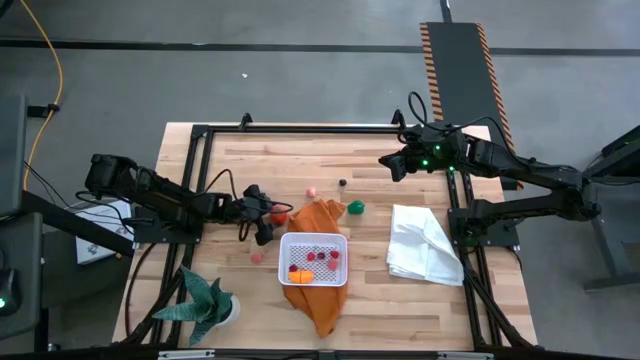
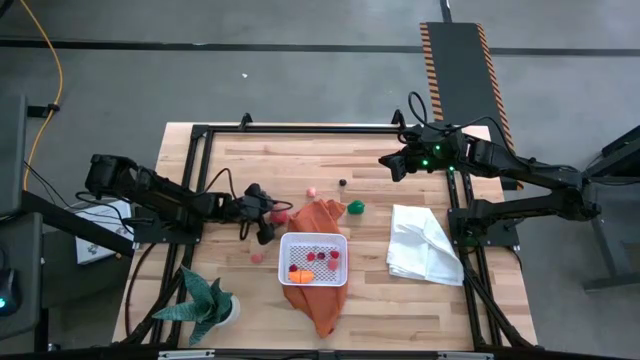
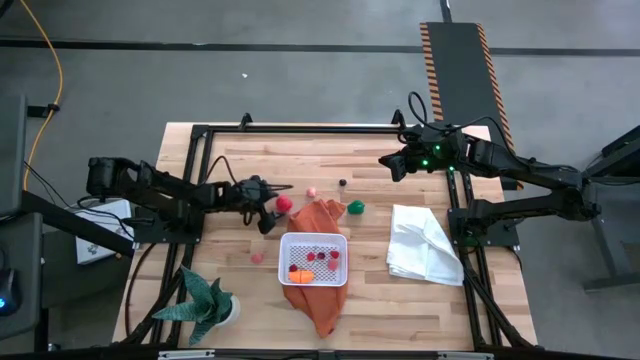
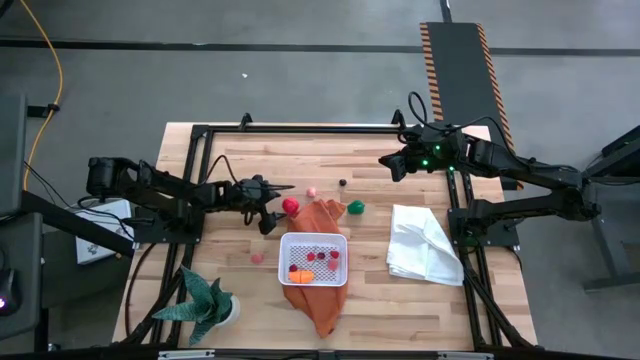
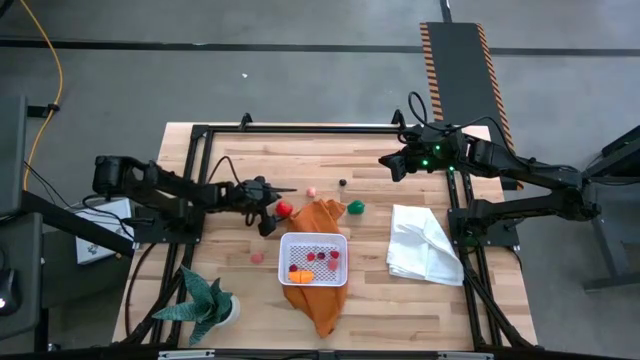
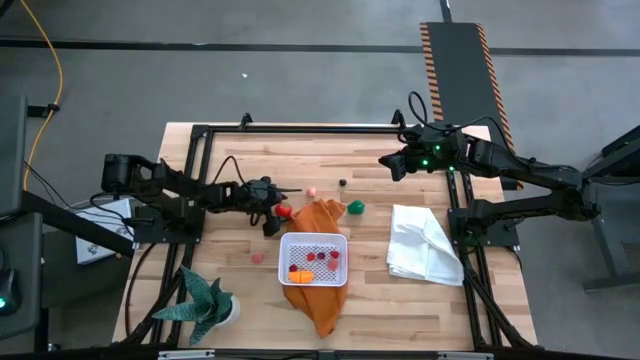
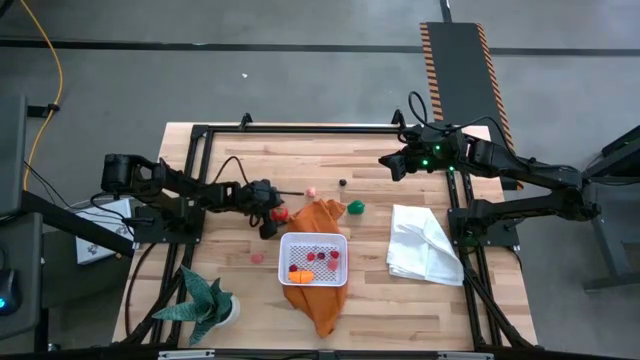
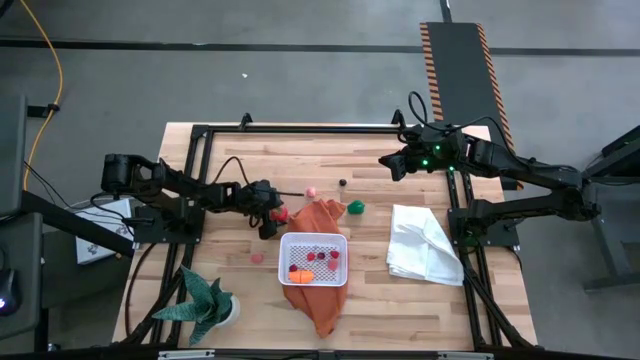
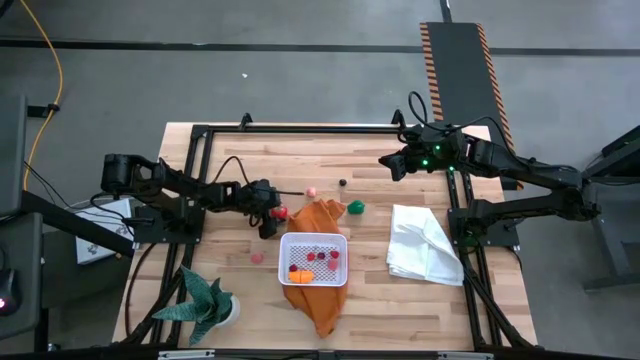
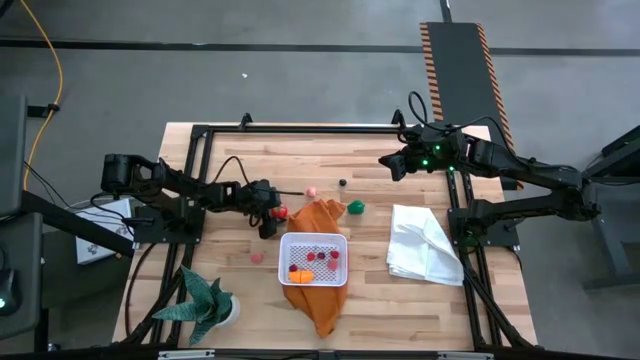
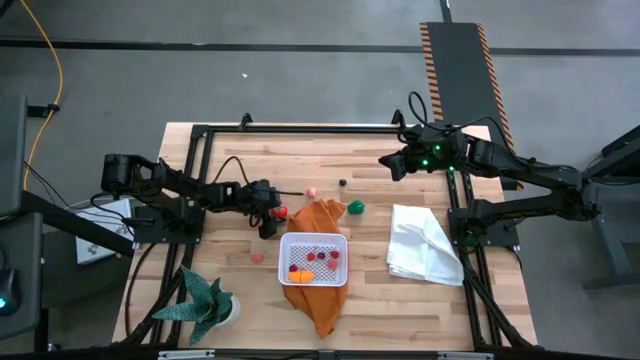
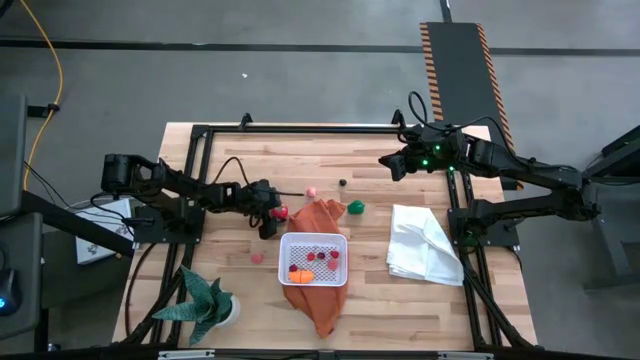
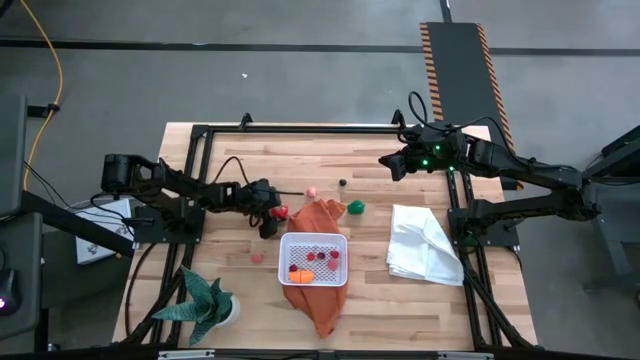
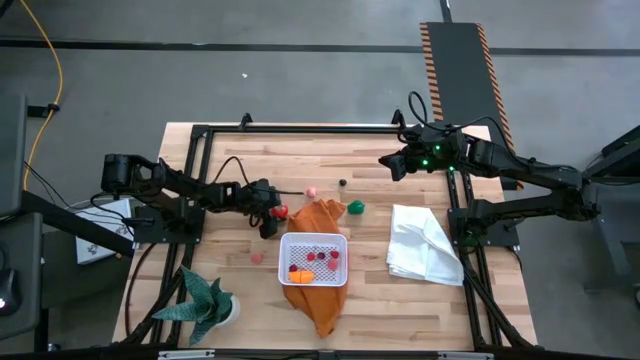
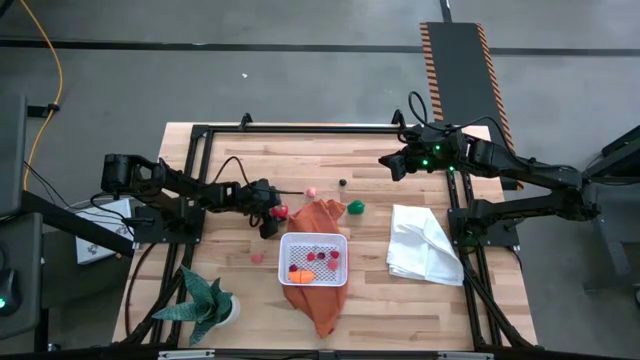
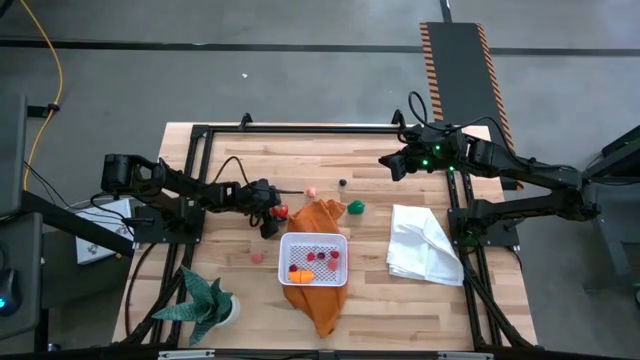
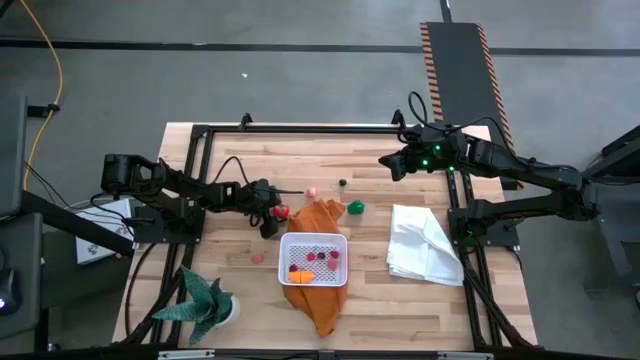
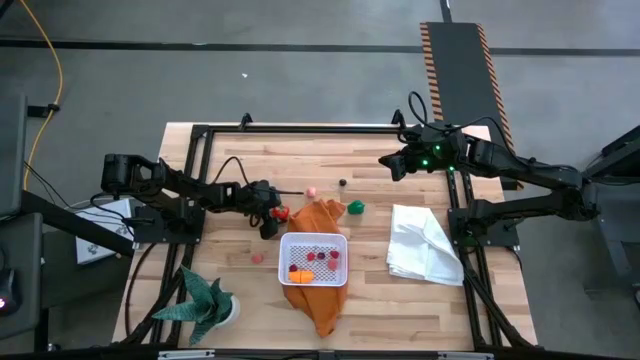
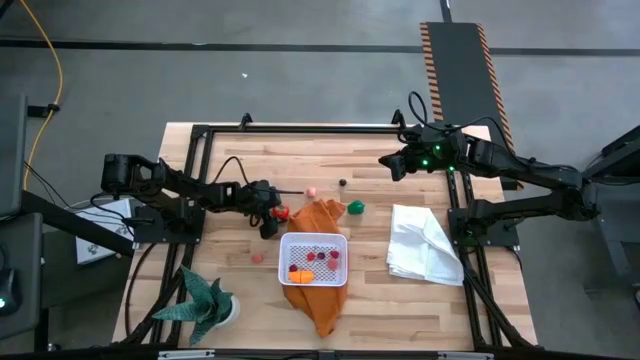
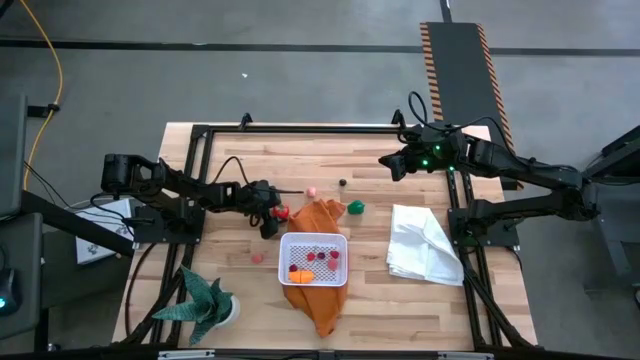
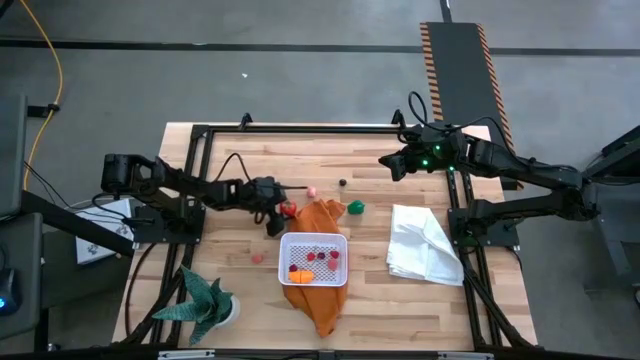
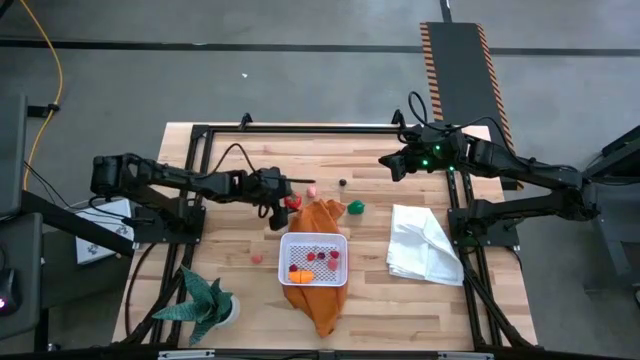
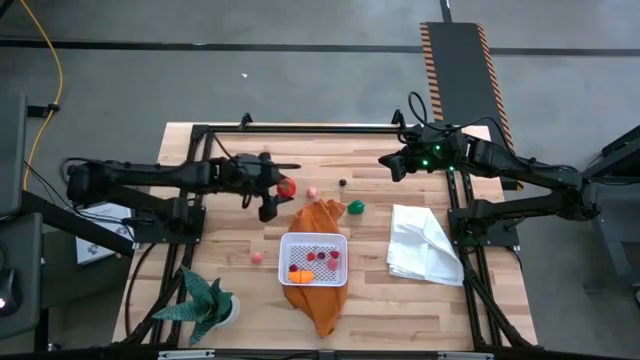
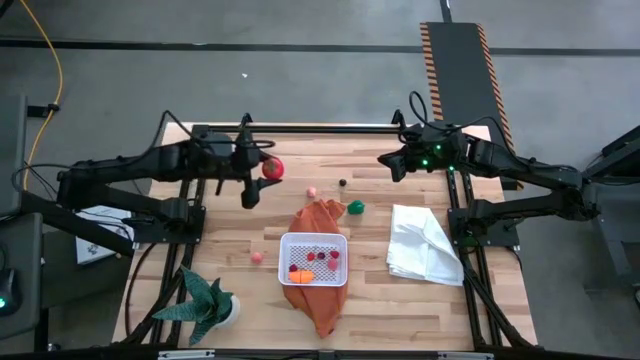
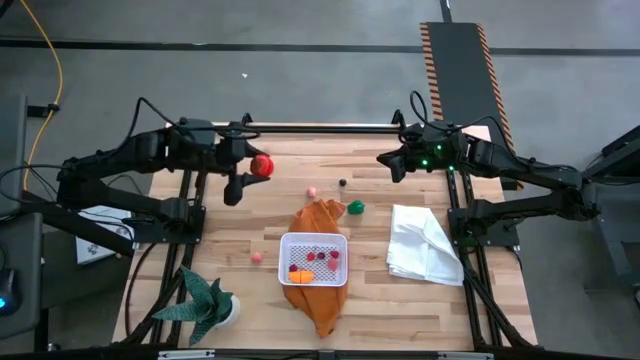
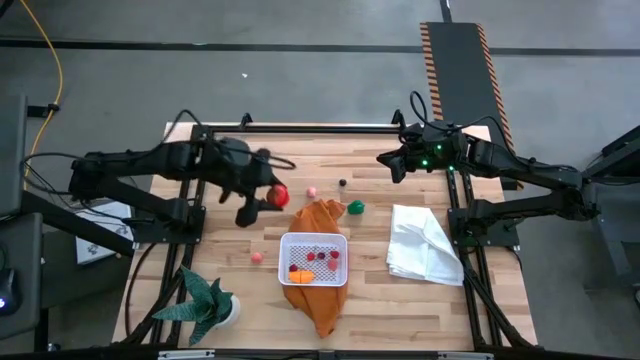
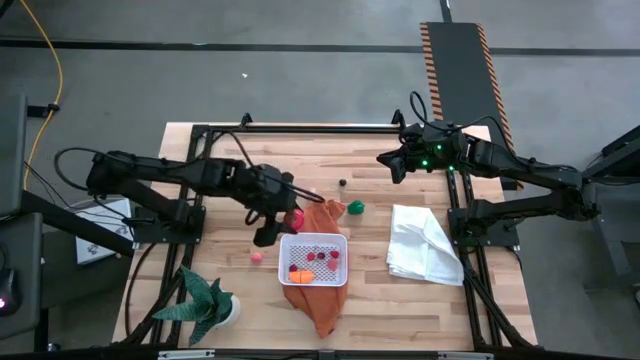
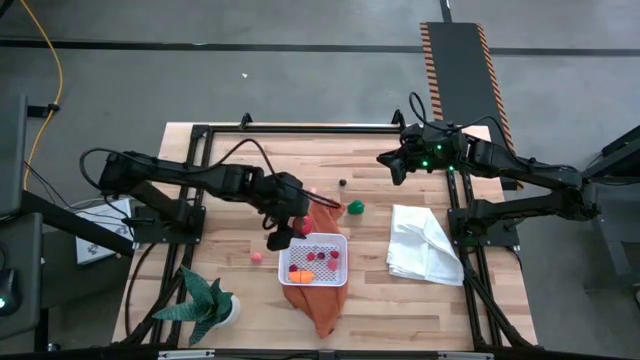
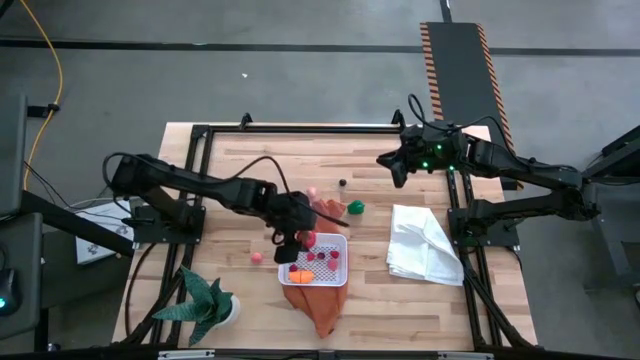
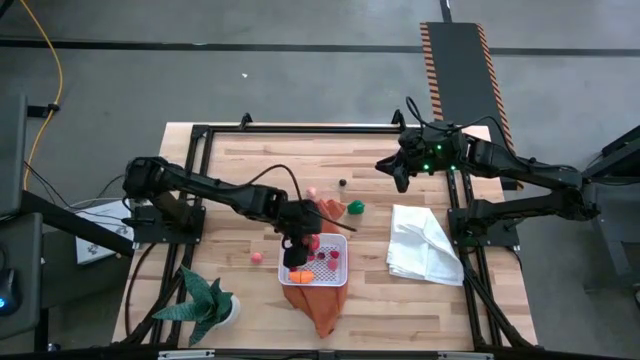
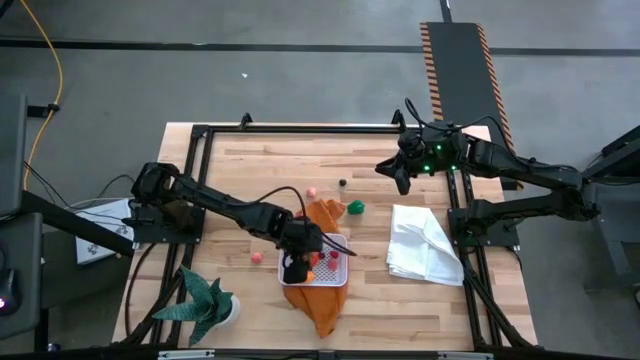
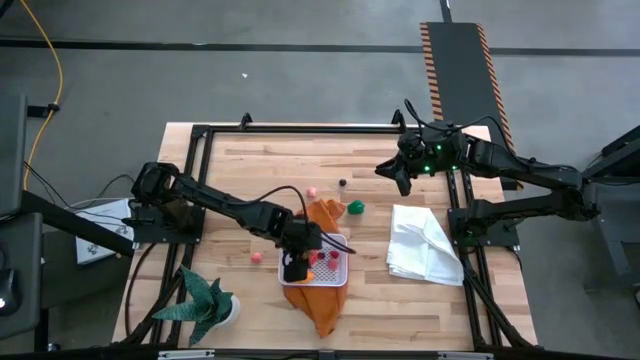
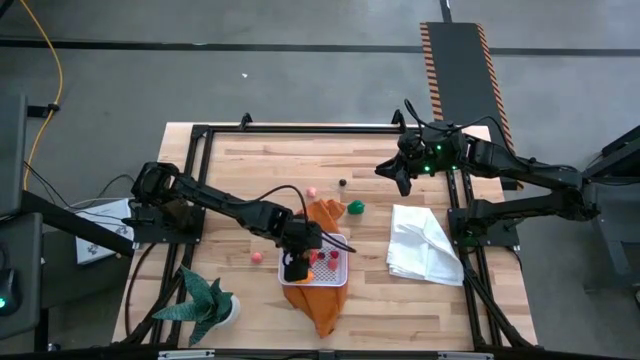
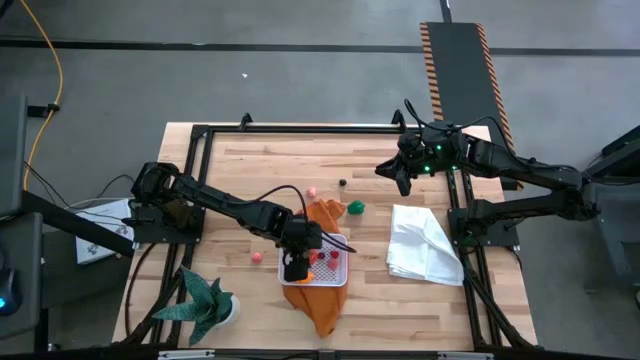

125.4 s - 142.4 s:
Task: Pick and placing Produce into tupperware
Put the red tomato into the white basket
